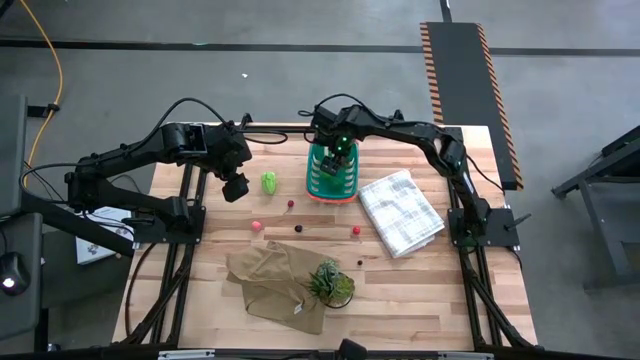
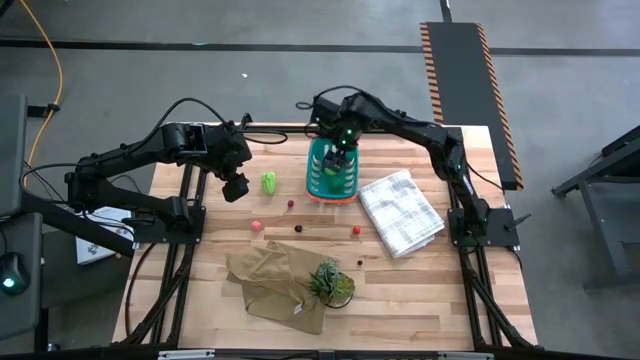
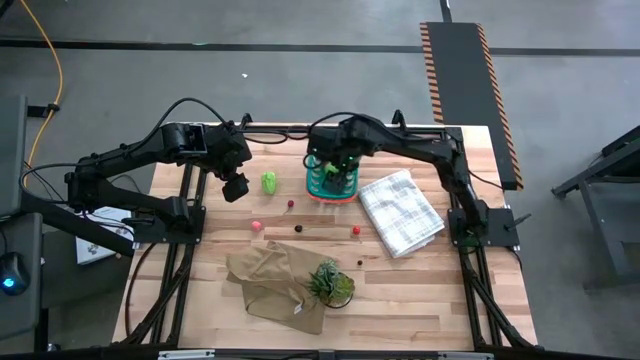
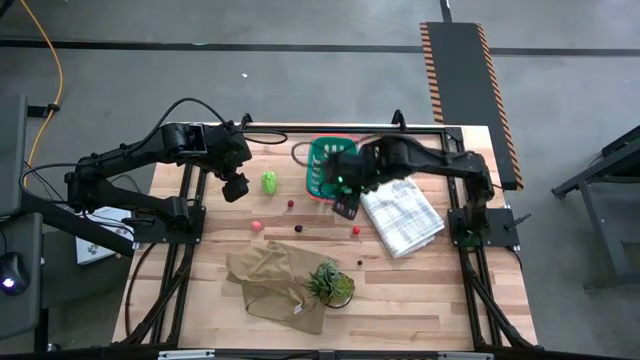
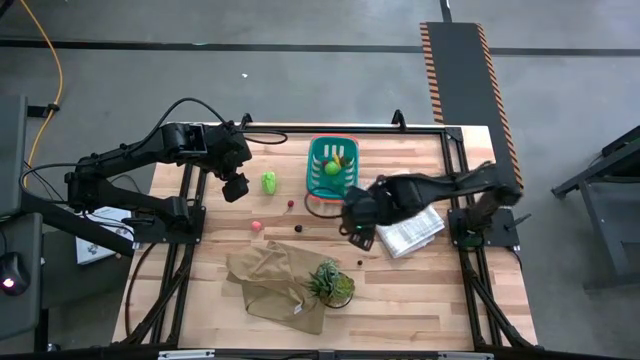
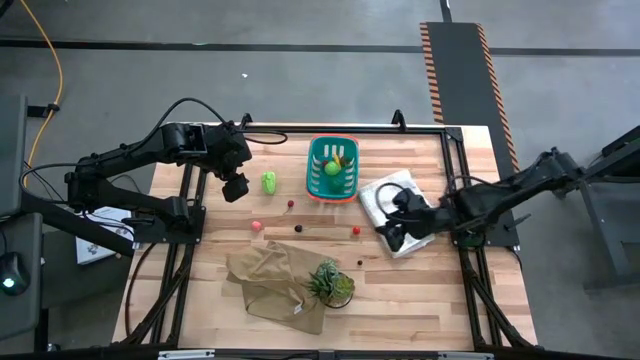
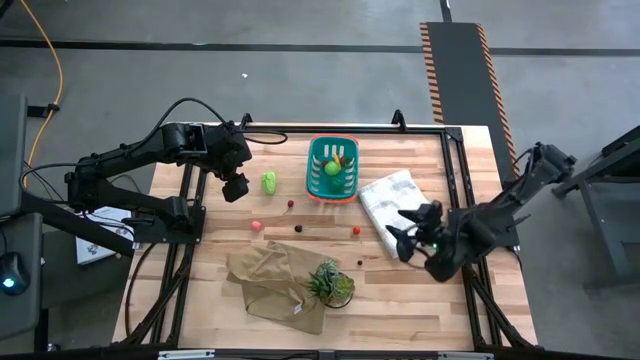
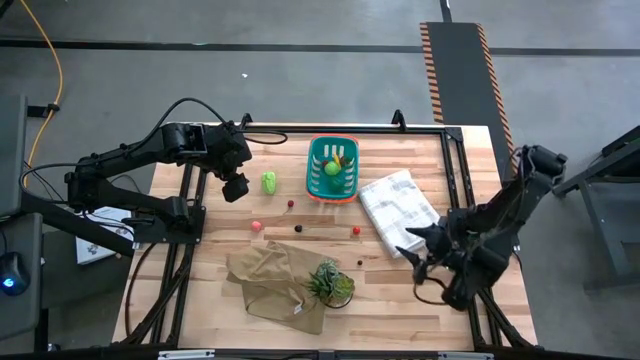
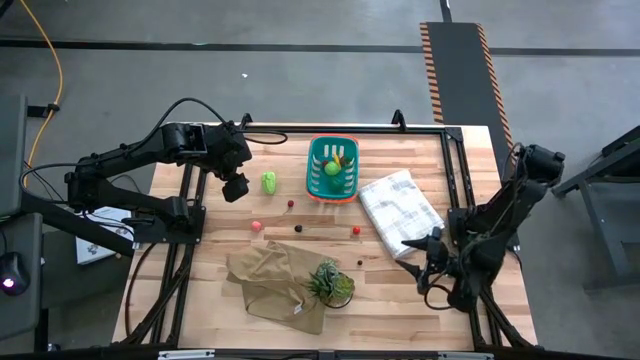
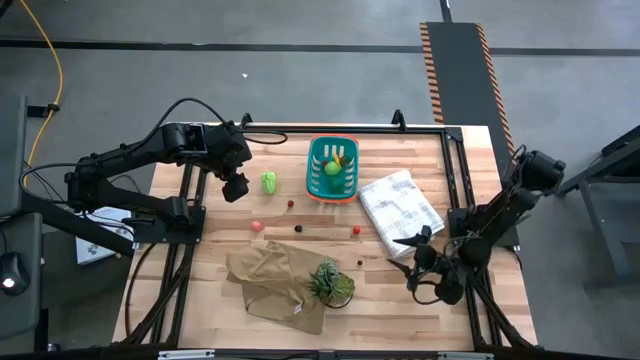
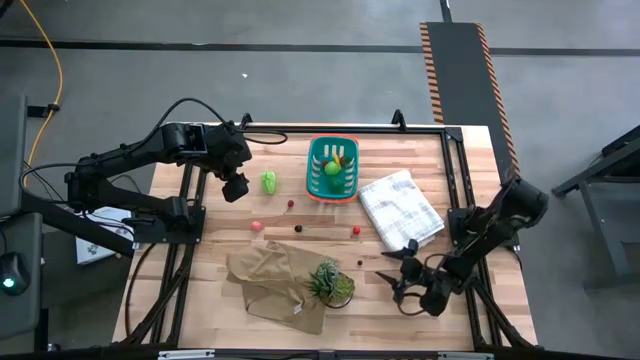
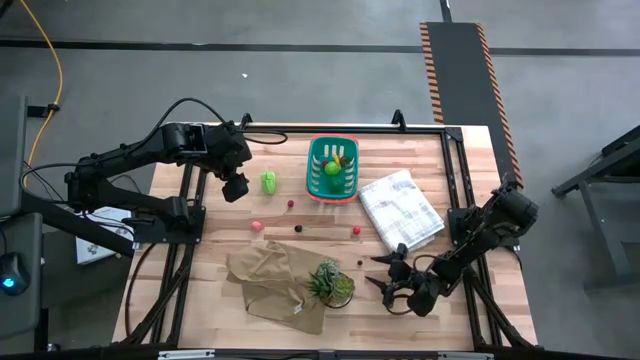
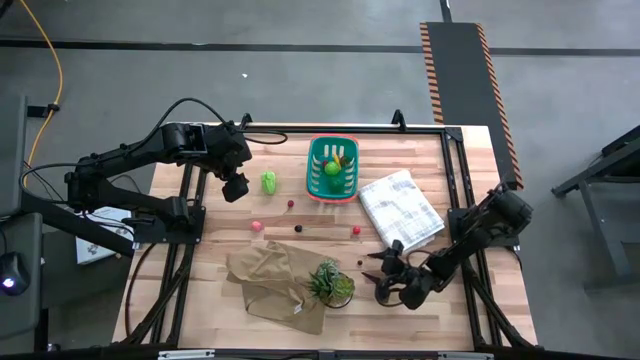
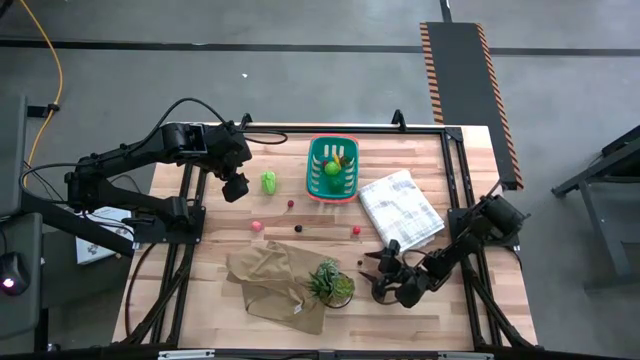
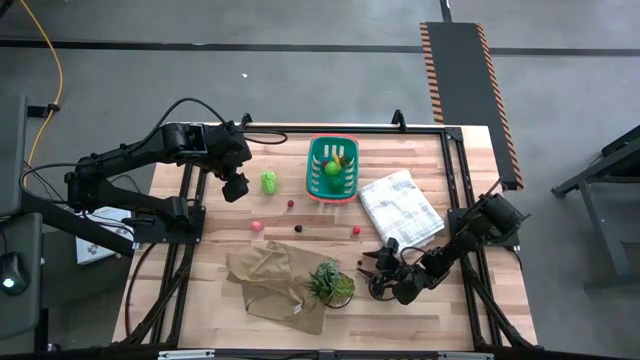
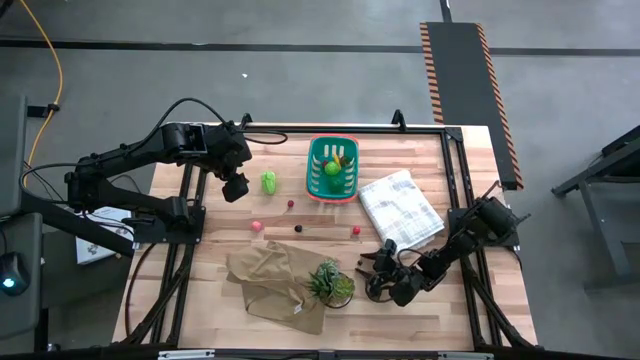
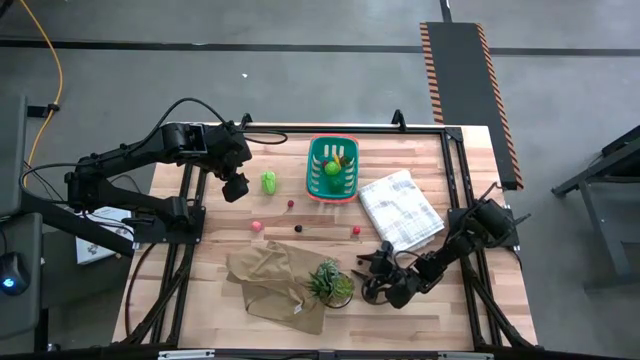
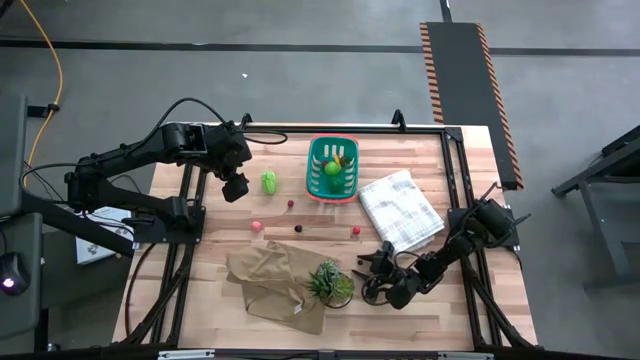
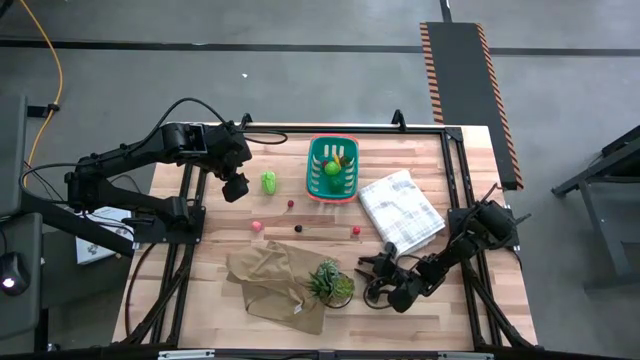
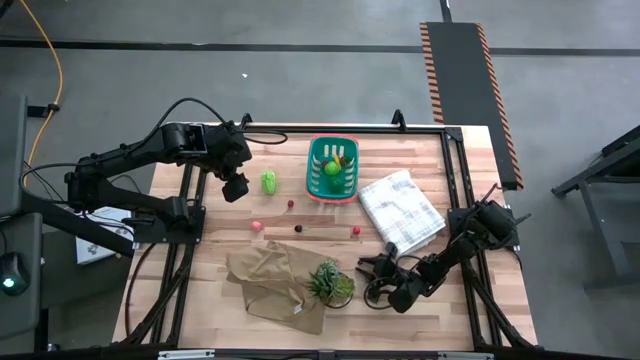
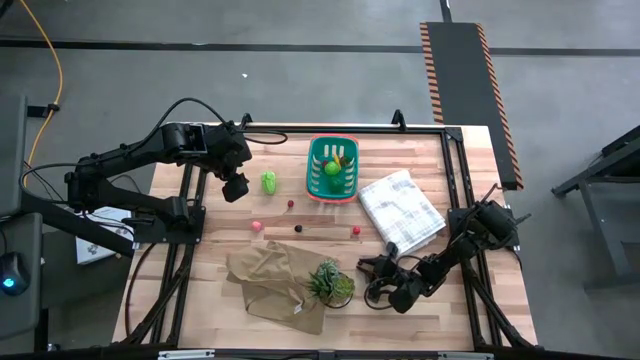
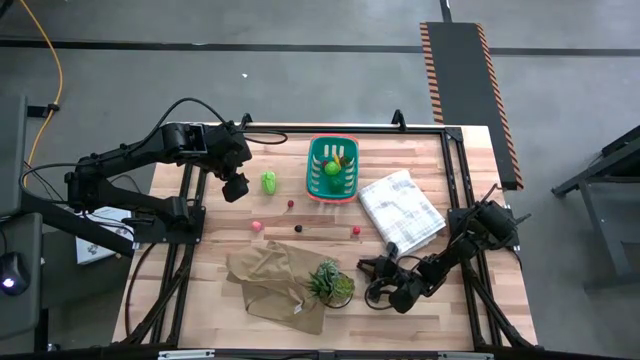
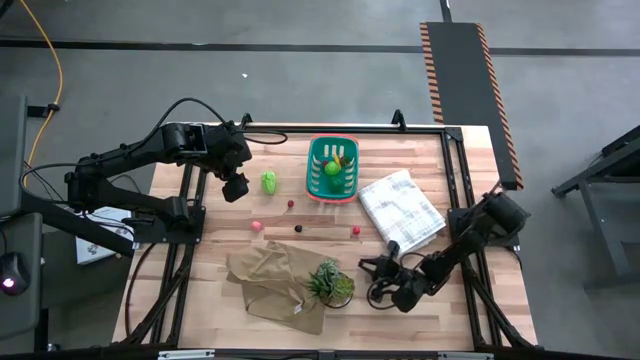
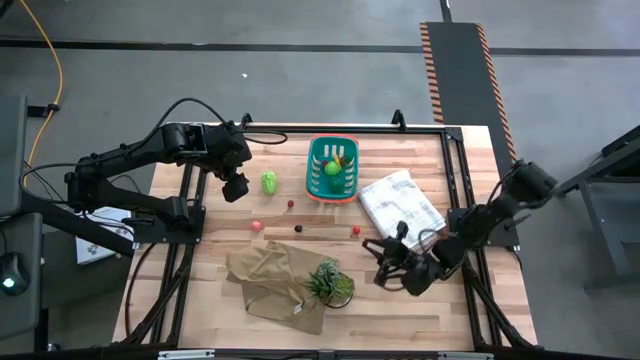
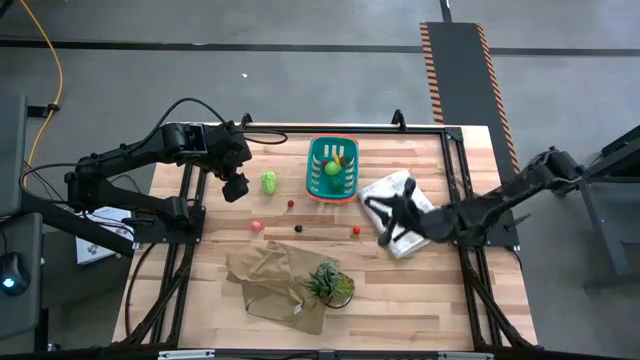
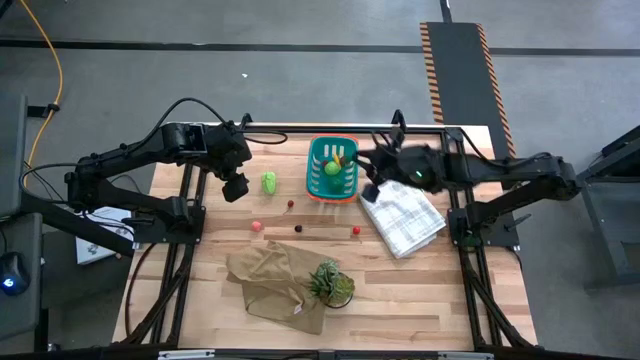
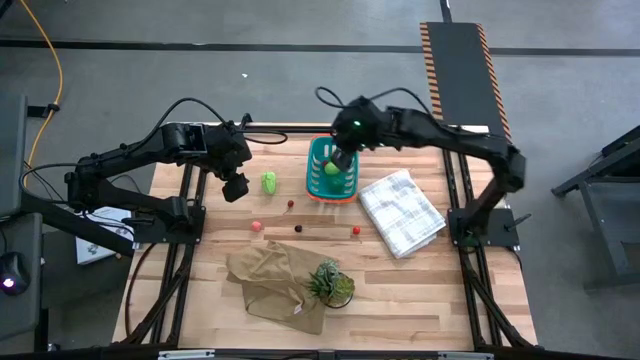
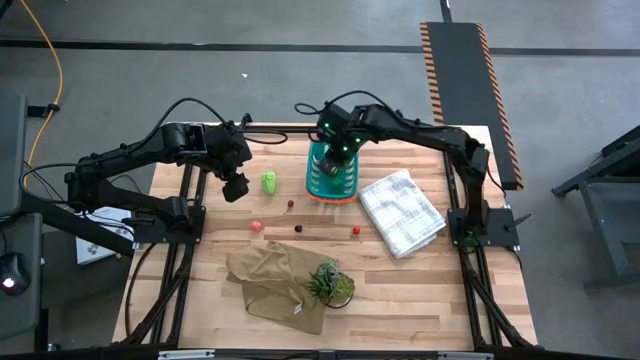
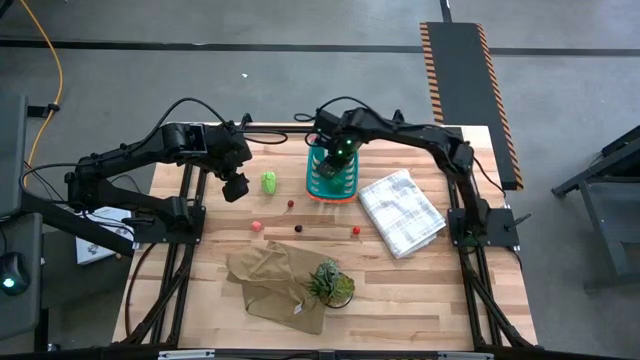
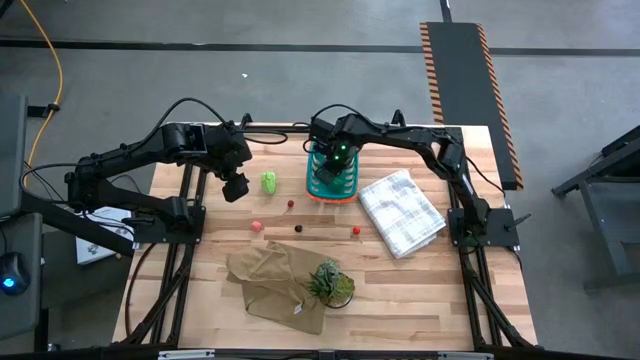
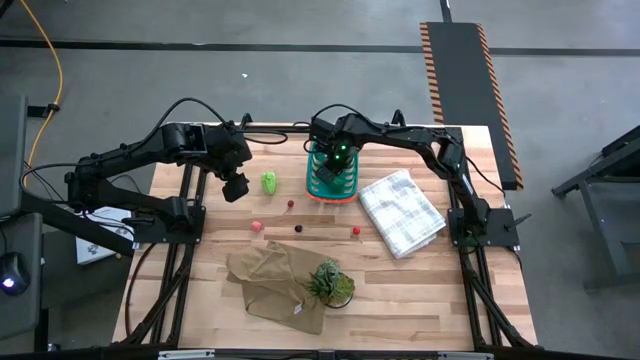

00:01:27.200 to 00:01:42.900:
Task: Pick and placing Produce into tupperware
Put the blueberry into the green basket

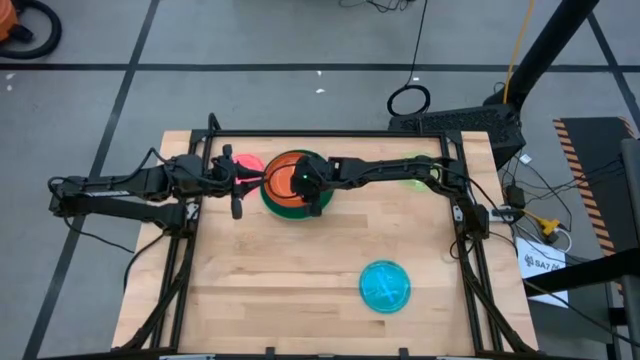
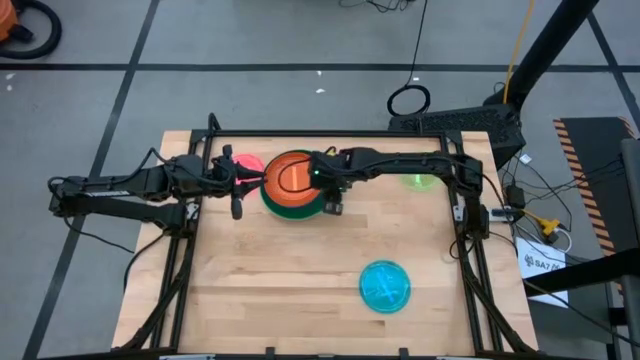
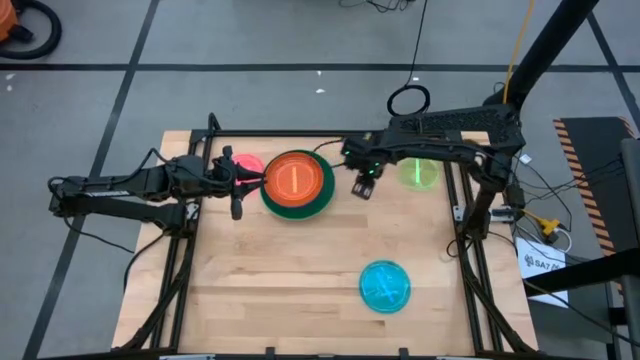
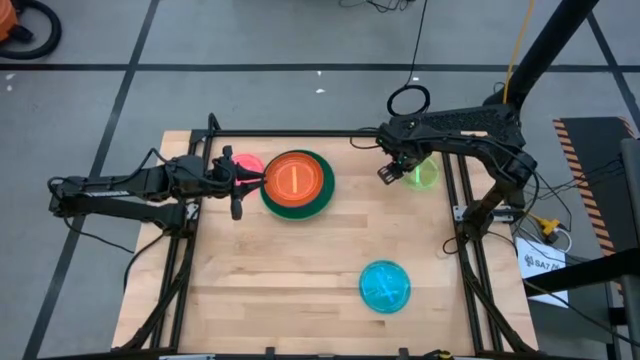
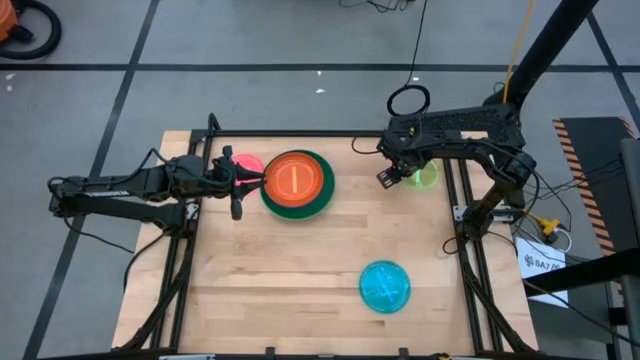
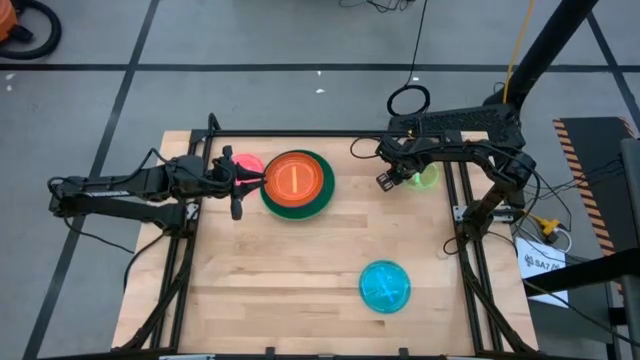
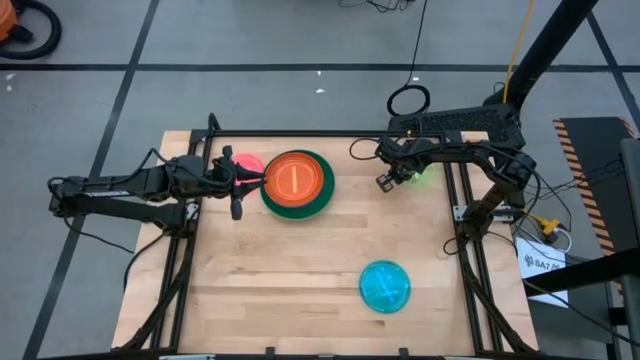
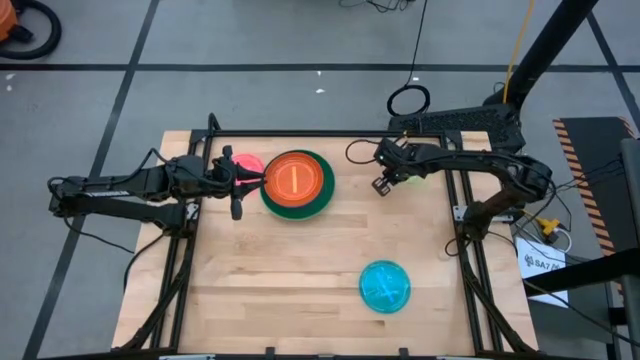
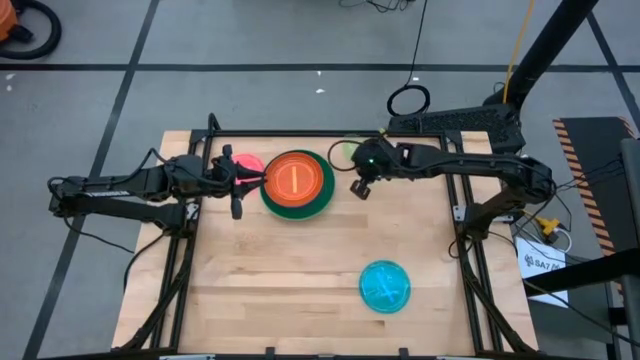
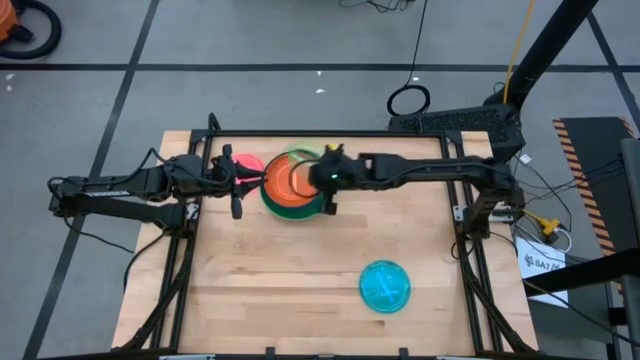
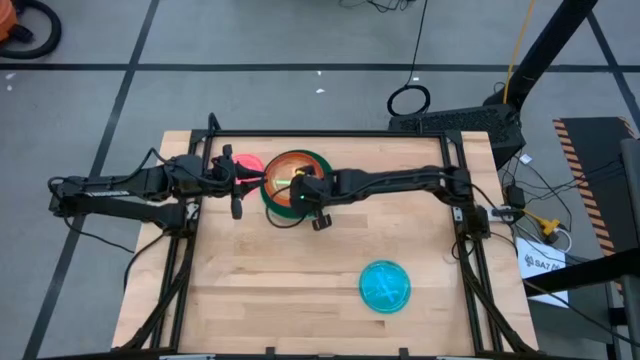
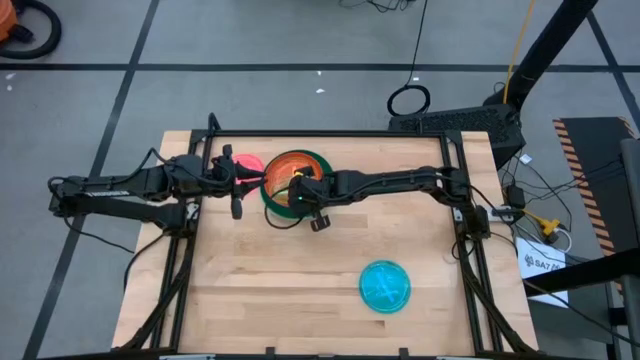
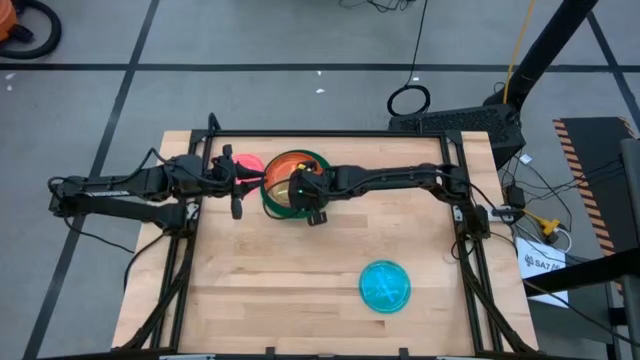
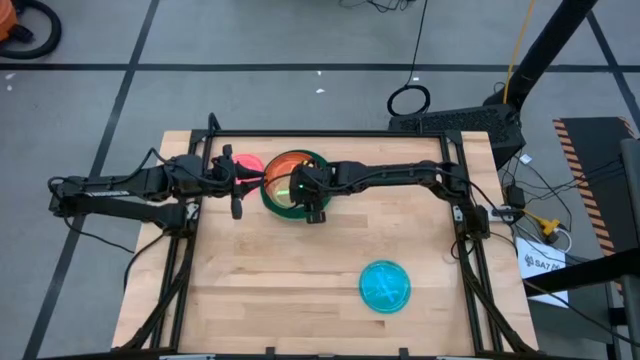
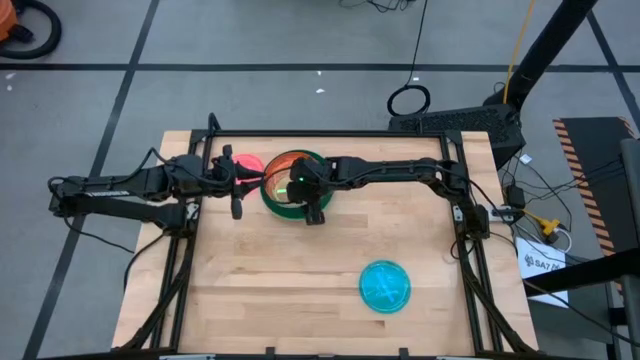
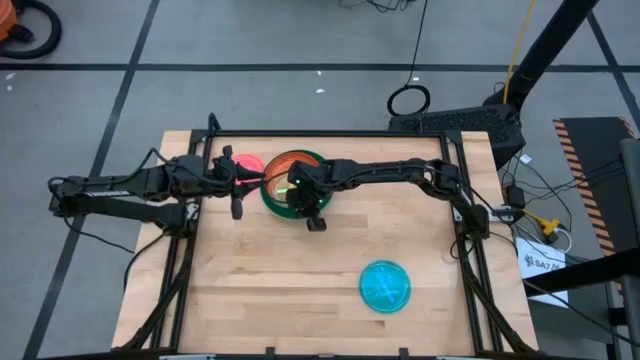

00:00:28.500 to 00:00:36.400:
Task: Stack plastic plates
Stack the light green plate on top of the orange plate
